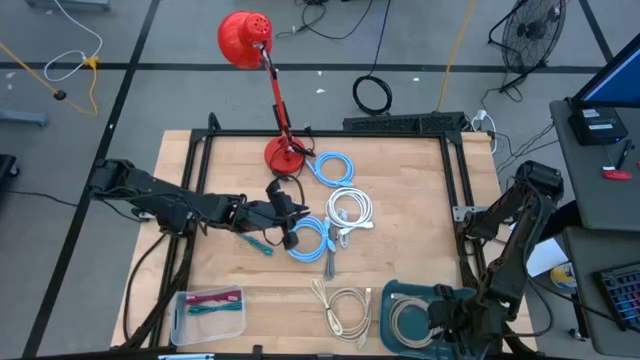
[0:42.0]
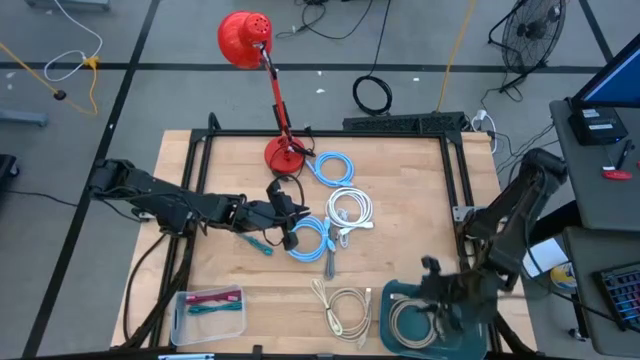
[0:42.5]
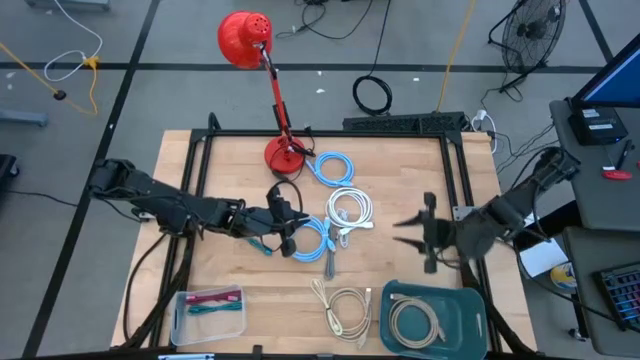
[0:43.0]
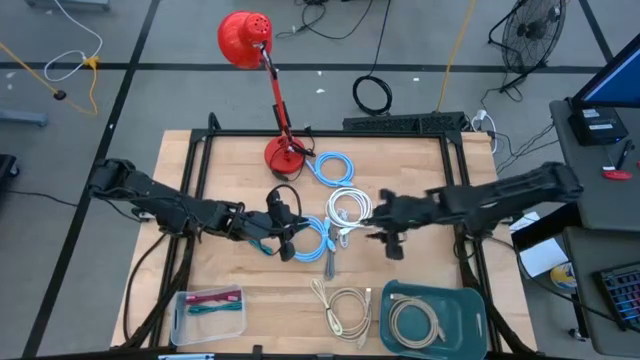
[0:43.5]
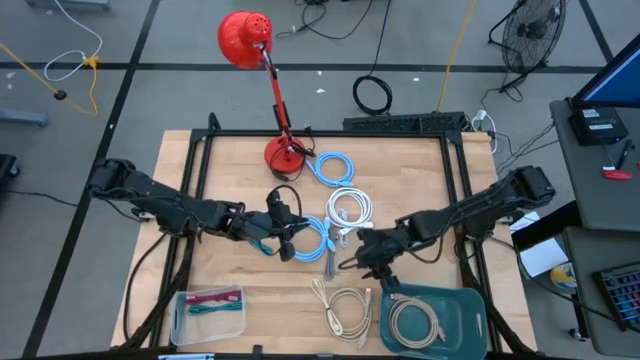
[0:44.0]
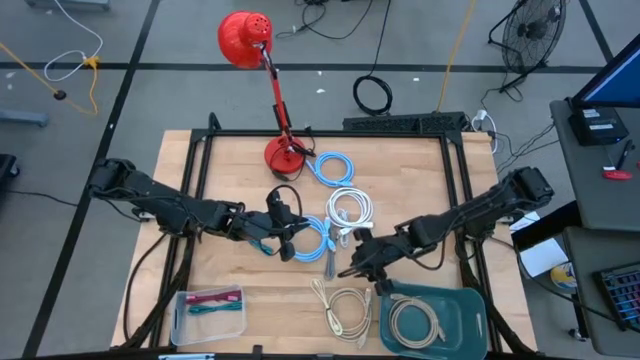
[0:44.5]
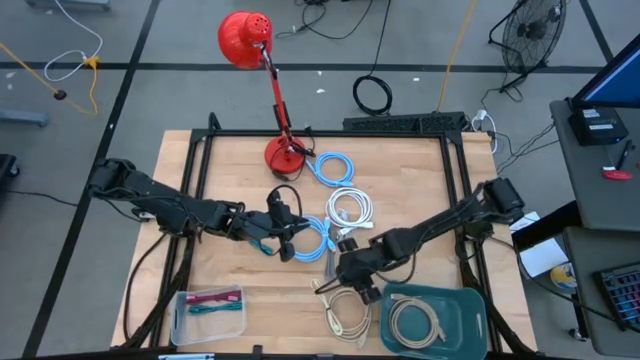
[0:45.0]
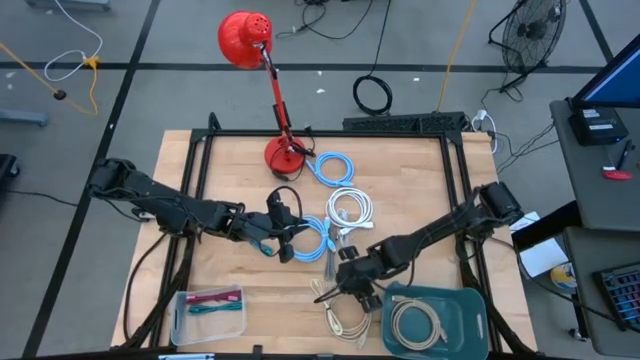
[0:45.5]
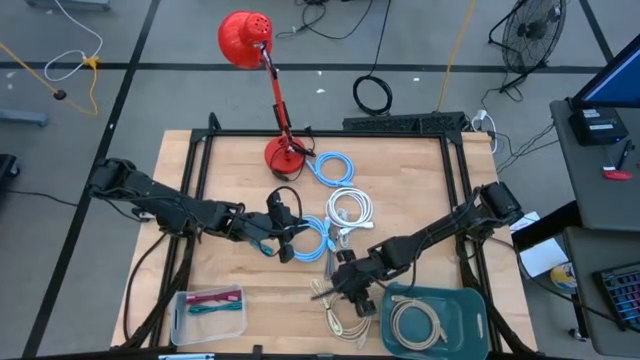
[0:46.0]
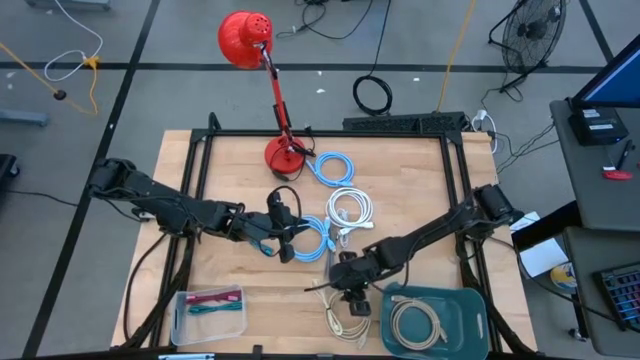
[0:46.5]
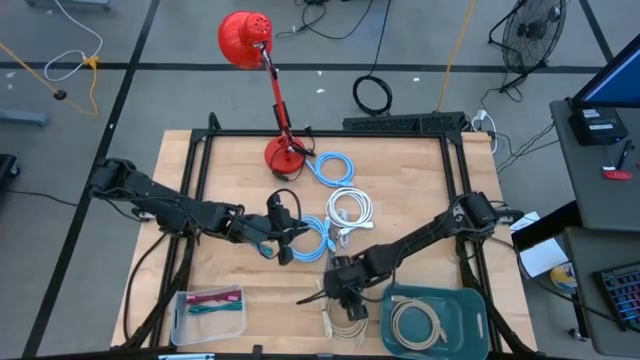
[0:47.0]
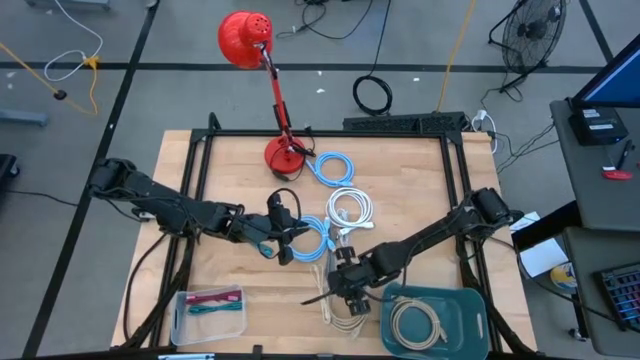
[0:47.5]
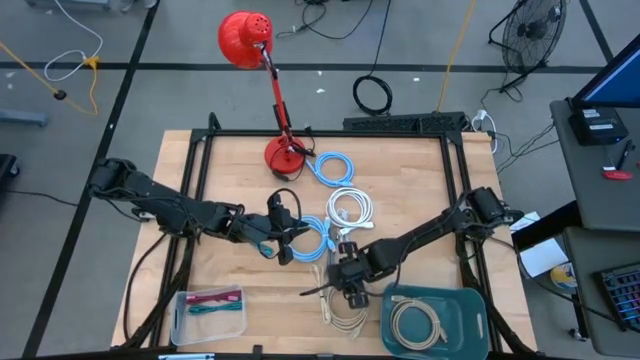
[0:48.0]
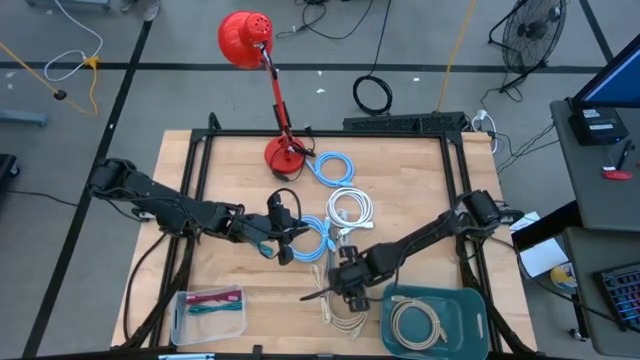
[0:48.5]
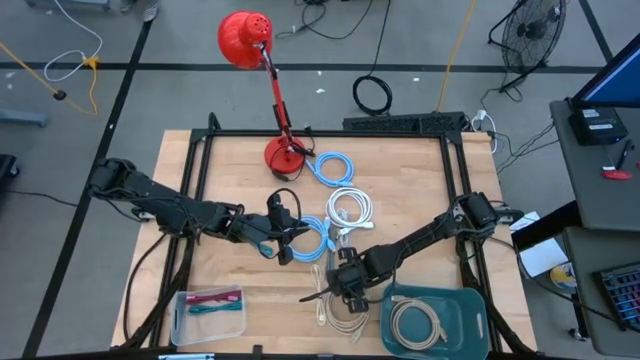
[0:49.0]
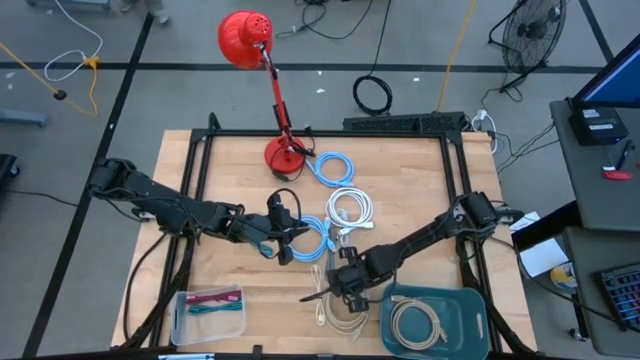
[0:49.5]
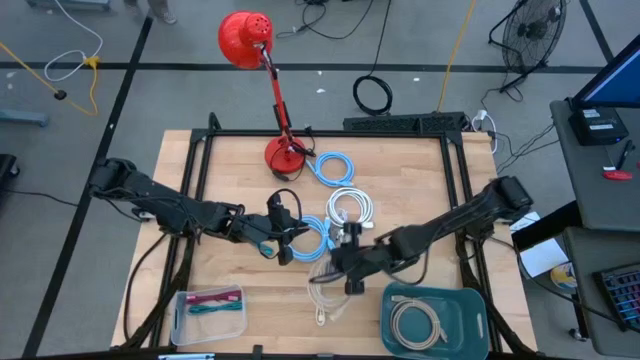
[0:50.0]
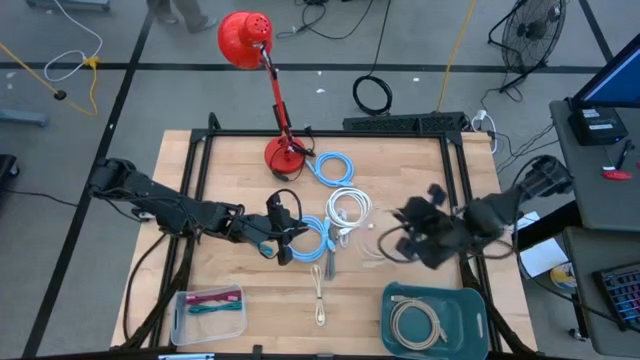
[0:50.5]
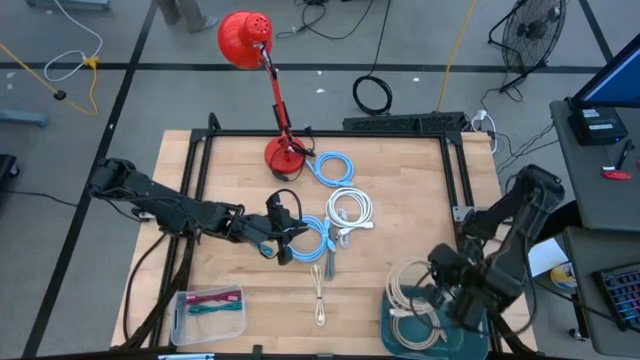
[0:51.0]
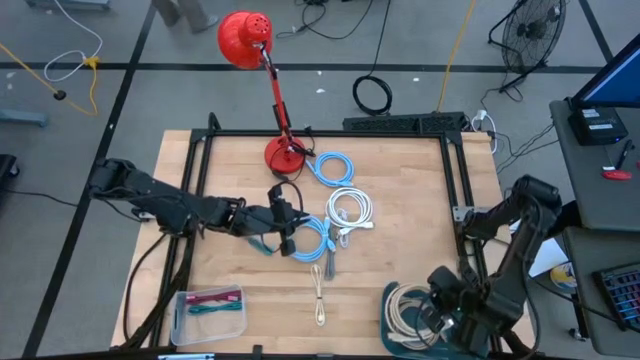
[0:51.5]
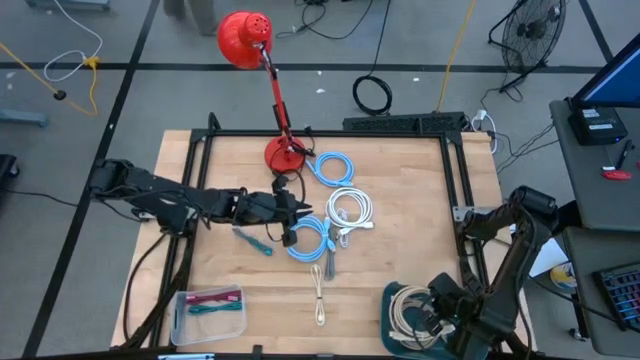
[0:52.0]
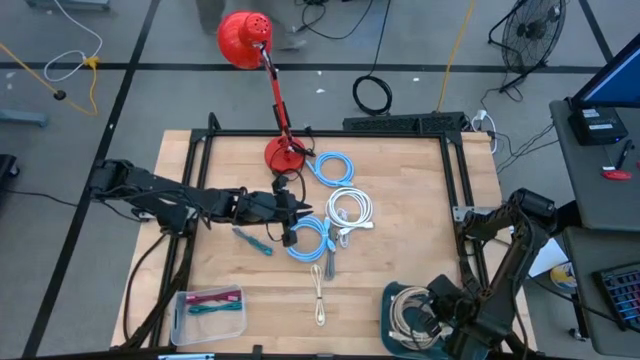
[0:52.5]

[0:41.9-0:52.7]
Task: Pick & Place USB Port
Put the brown charger cable into the blue bin

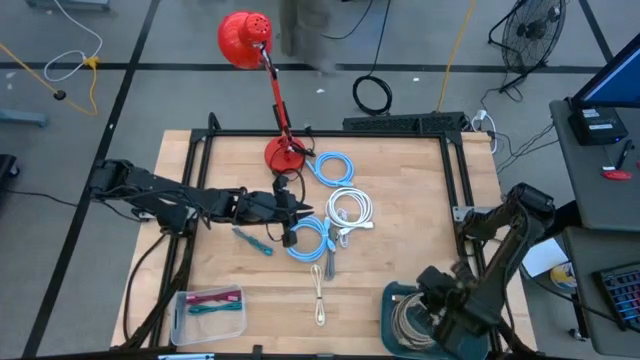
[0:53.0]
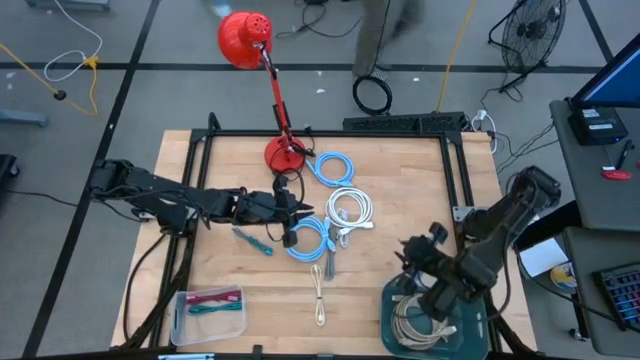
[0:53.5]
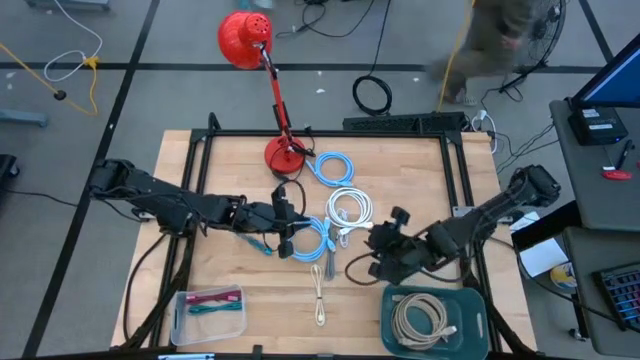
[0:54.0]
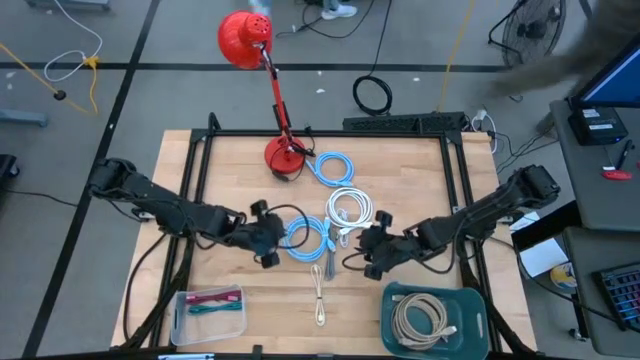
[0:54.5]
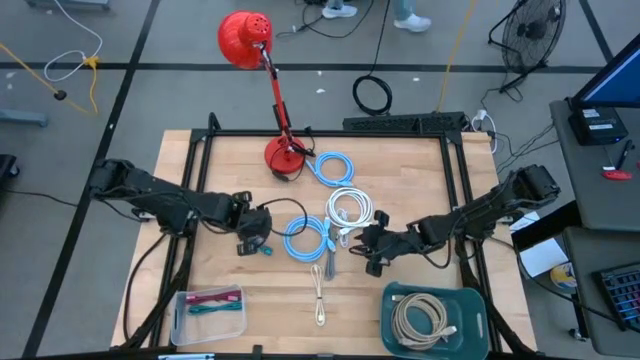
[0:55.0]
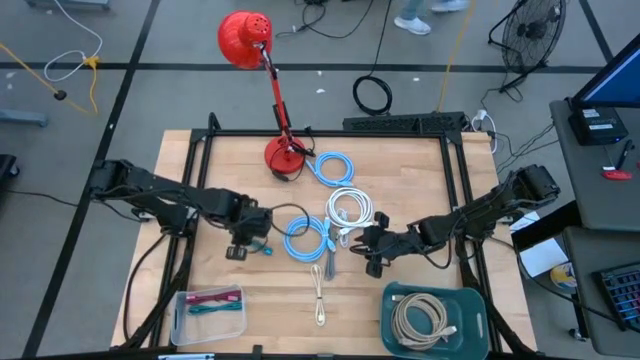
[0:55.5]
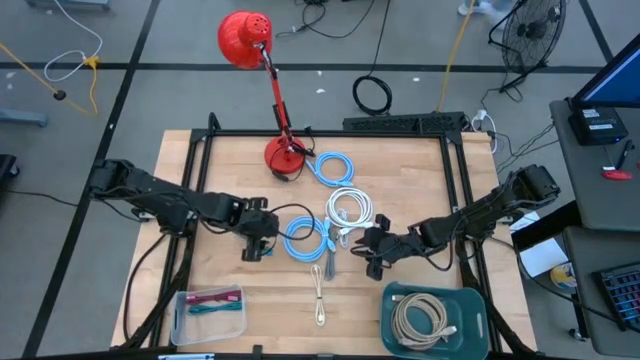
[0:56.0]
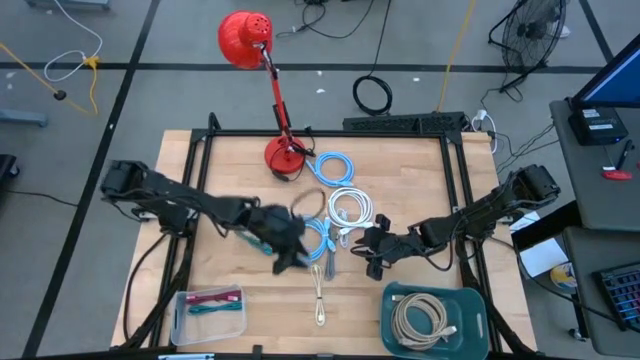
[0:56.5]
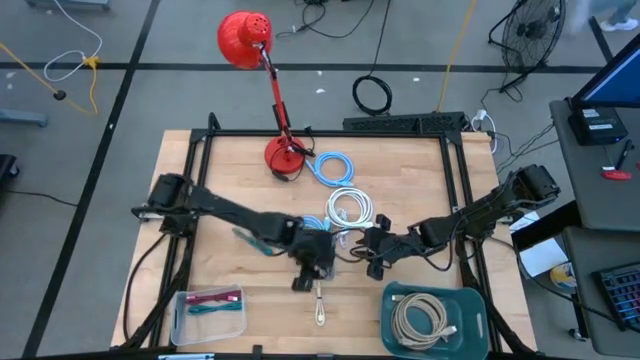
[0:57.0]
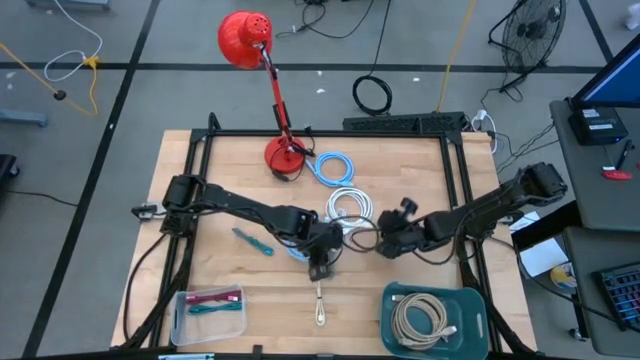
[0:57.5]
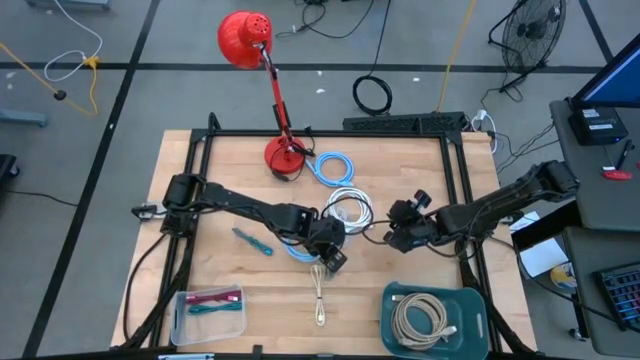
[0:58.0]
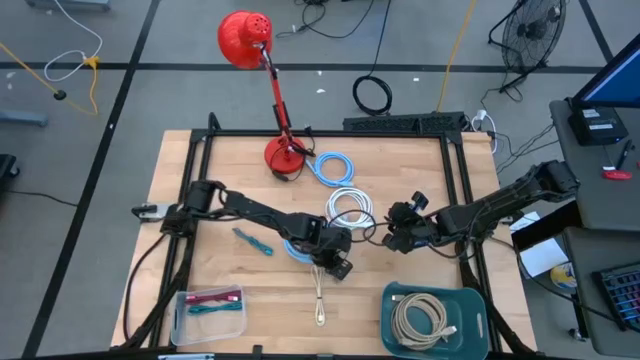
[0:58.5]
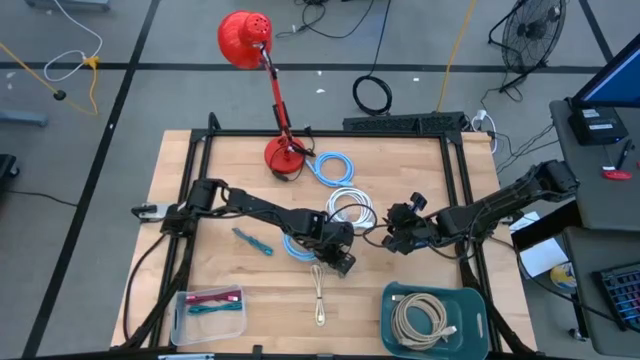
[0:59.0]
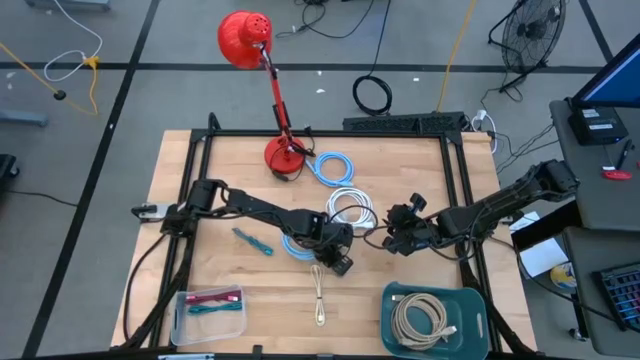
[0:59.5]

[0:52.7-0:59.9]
Put the white black charger cable into the transparent bin
